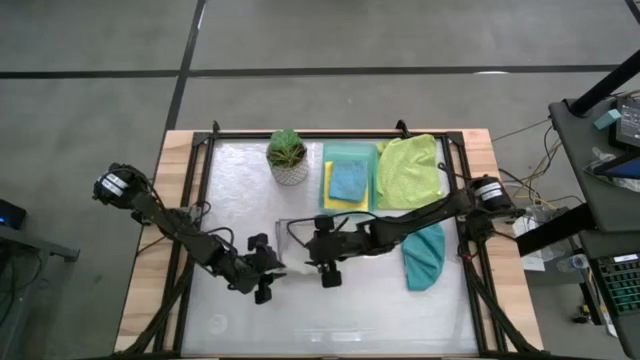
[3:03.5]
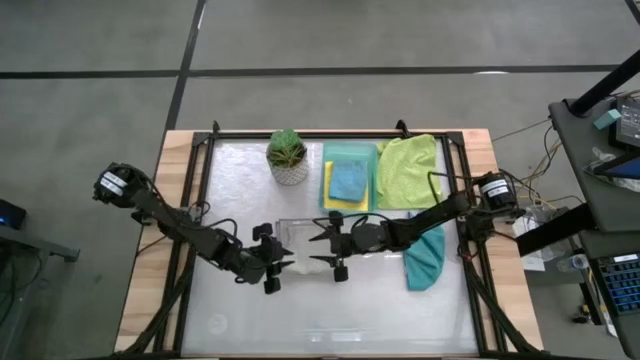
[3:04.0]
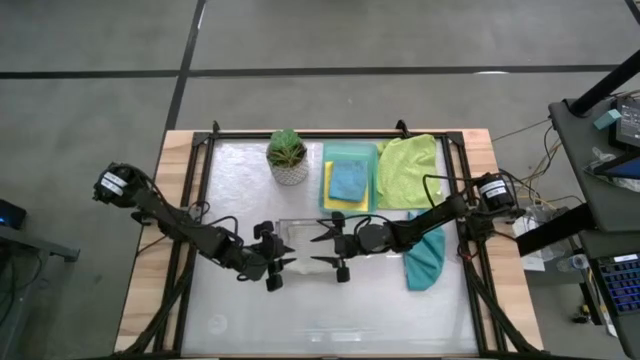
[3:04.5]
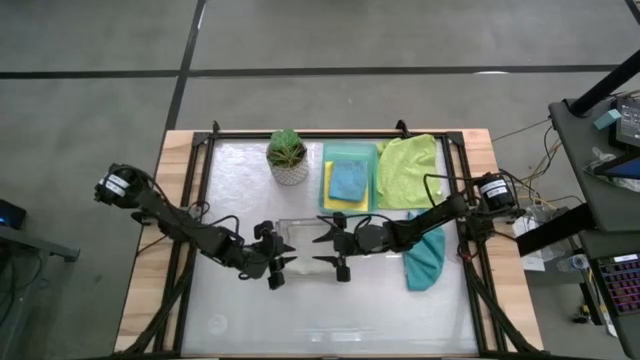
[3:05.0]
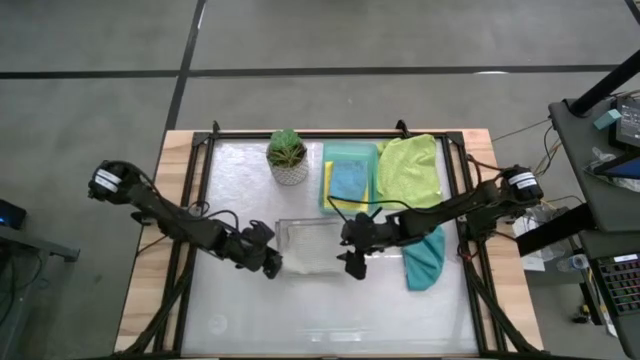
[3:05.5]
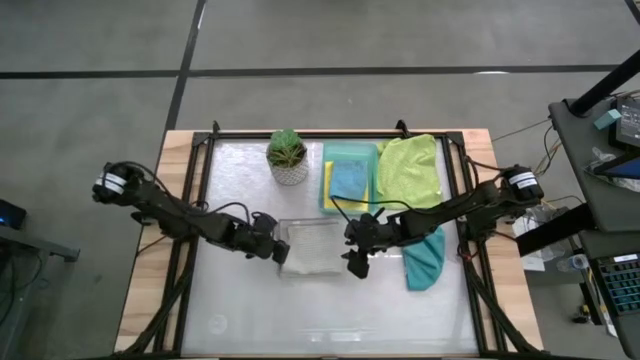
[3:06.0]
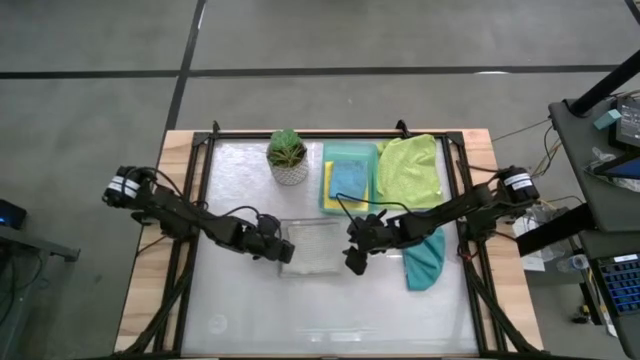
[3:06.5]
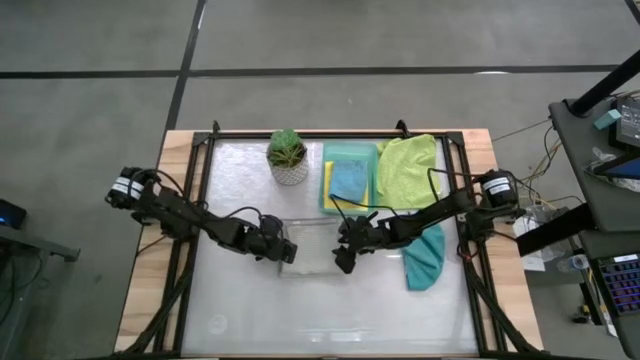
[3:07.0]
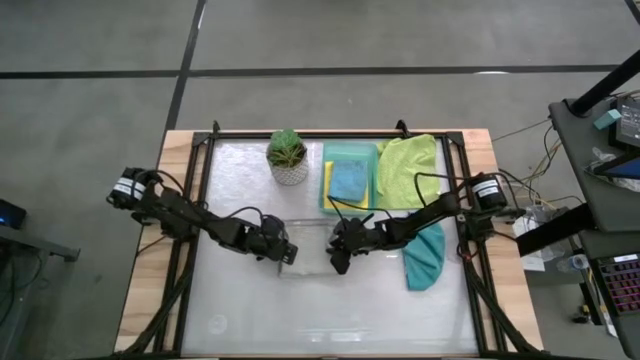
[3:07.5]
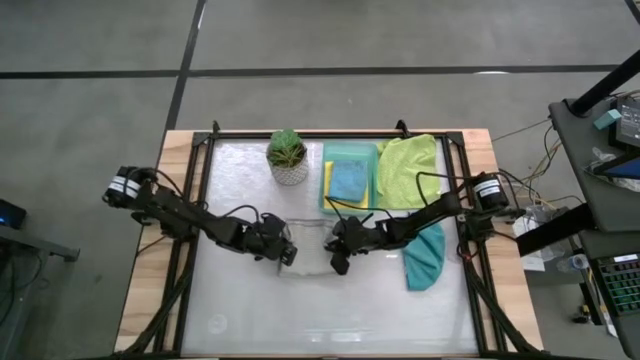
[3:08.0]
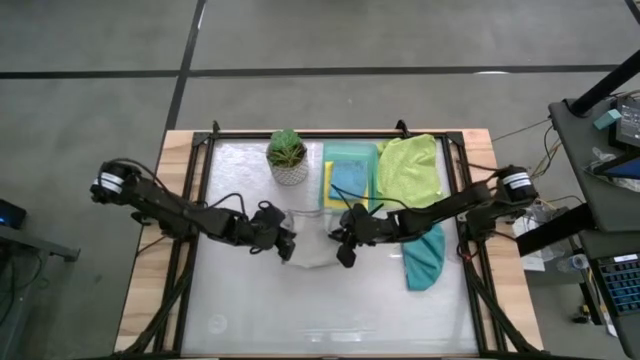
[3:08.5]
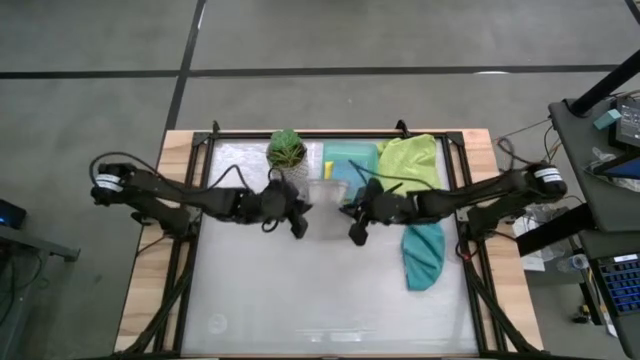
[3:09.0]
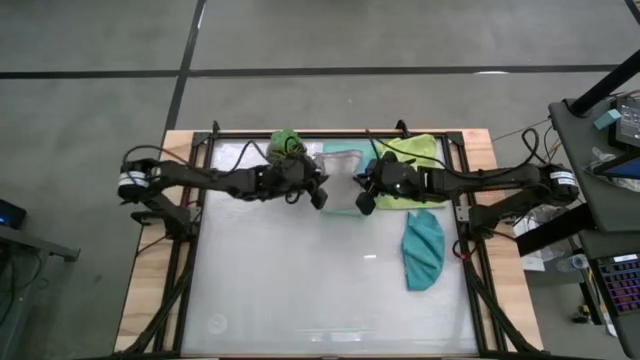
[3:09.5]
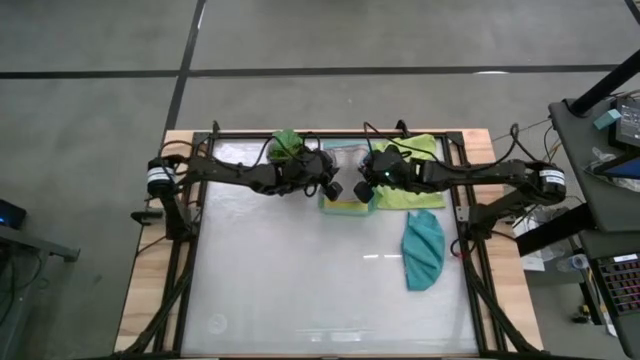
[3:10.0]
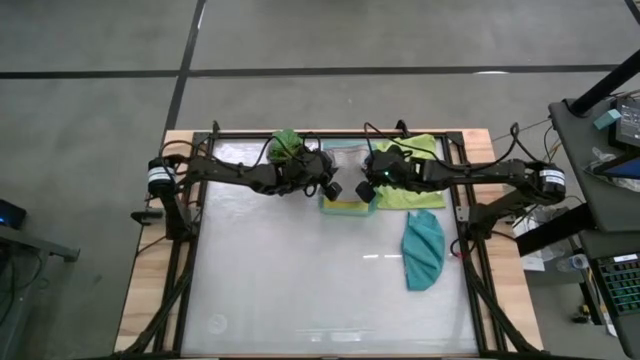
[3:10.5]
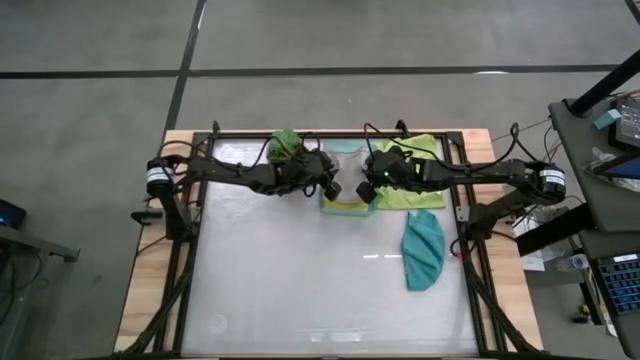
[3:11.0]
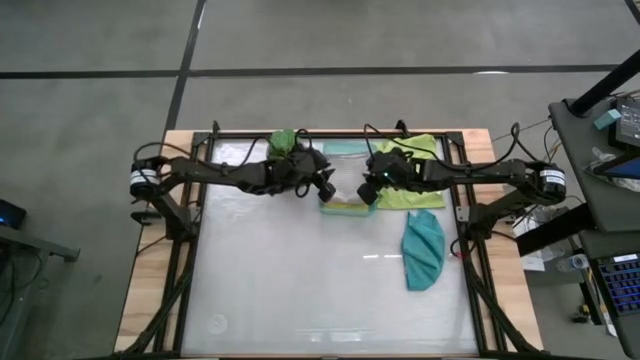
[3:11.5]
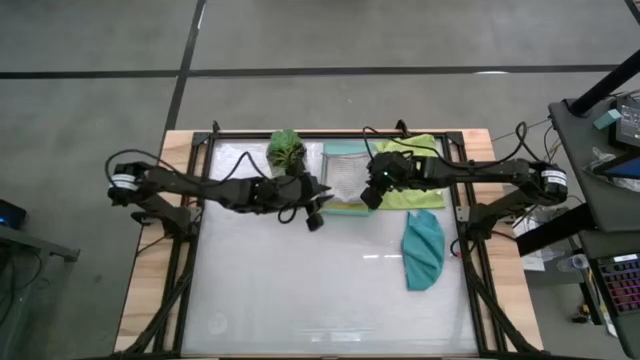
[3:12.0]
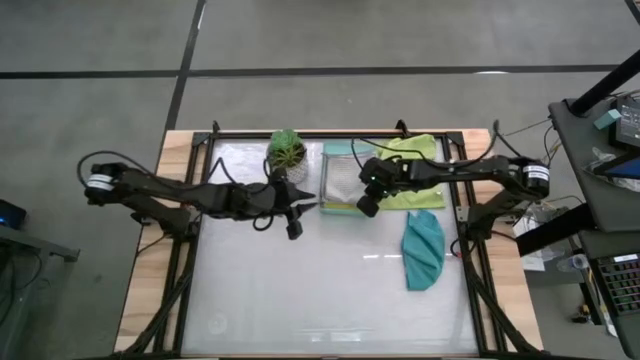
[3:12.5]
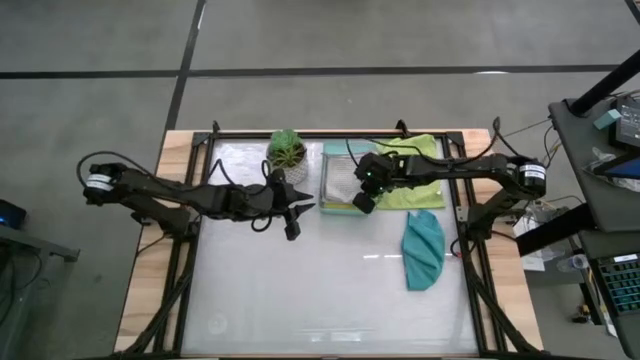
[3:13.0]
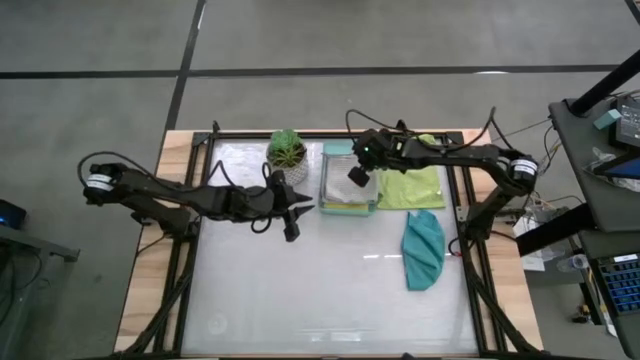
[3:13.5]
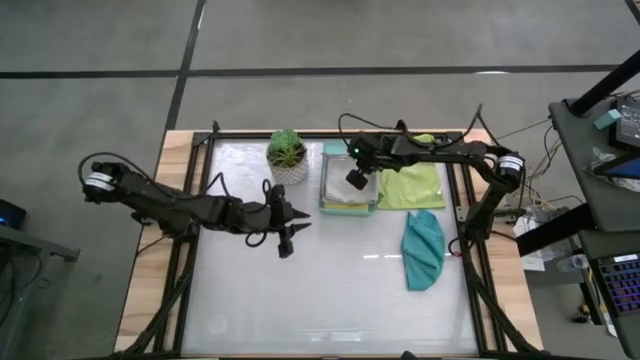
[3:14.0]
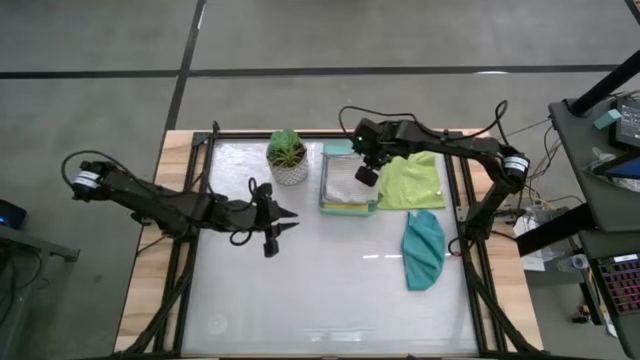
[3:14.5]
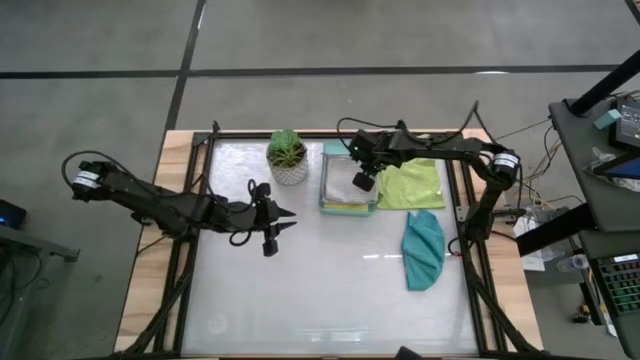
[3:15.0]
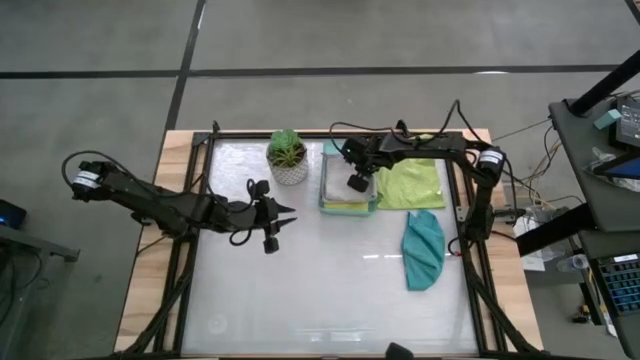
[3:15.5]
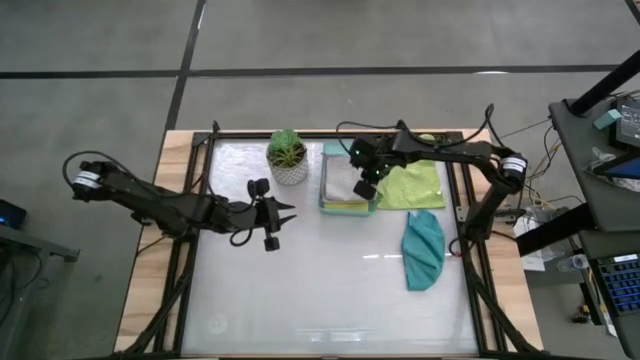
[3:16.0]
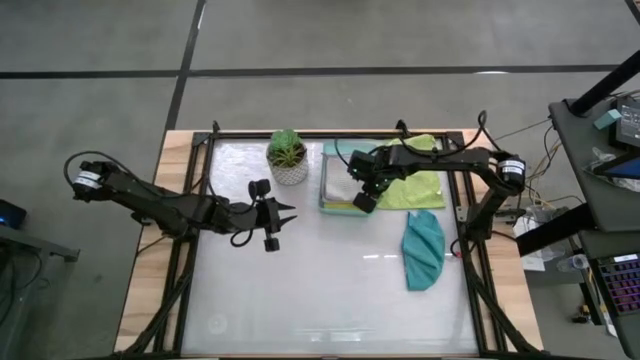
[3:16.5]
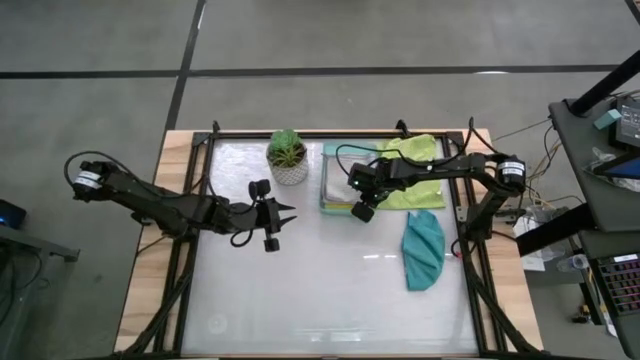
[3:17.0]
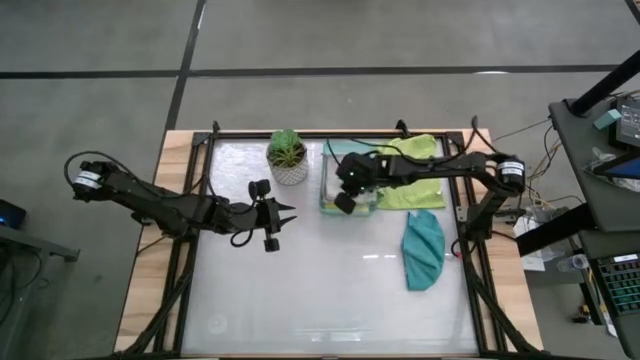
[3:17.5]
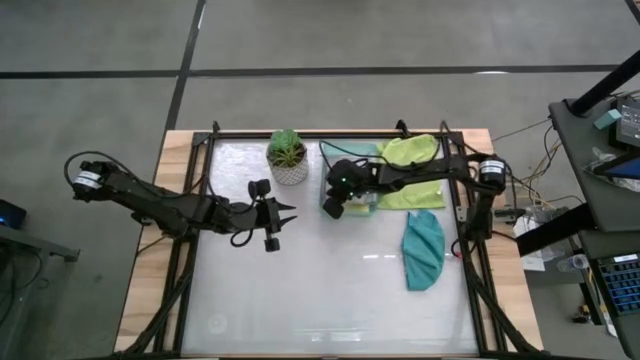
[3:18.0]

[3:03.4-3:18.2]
Task: Fold microfiber towels
Put the folded gray microfiber cloth into the blue bin

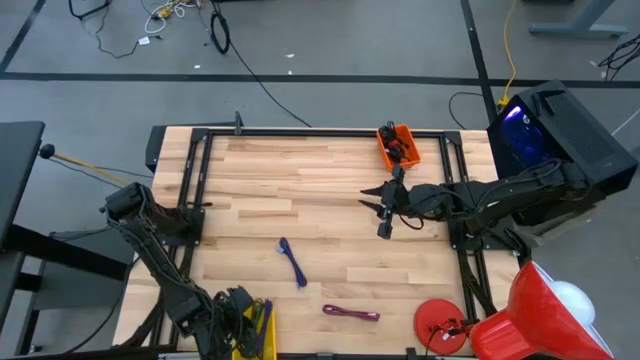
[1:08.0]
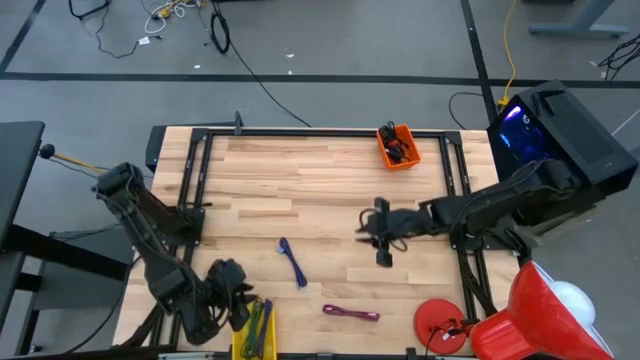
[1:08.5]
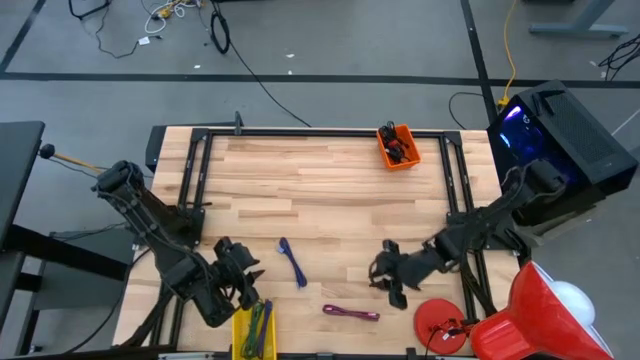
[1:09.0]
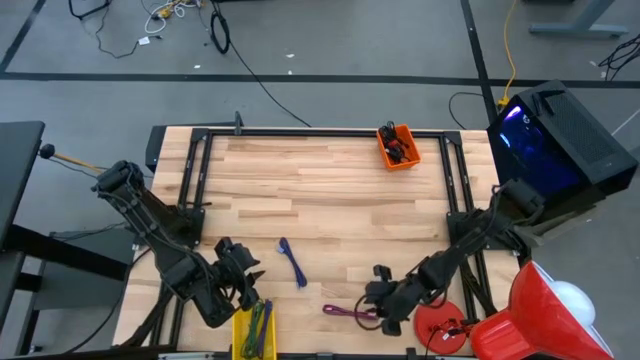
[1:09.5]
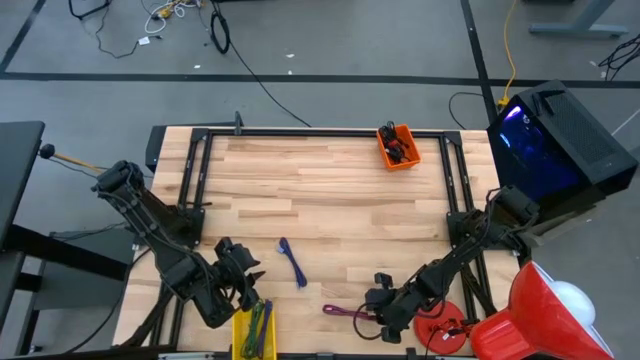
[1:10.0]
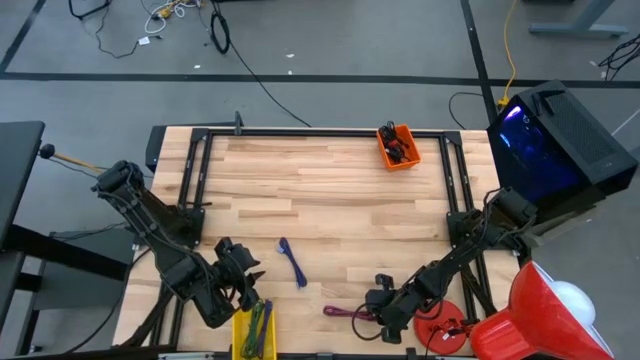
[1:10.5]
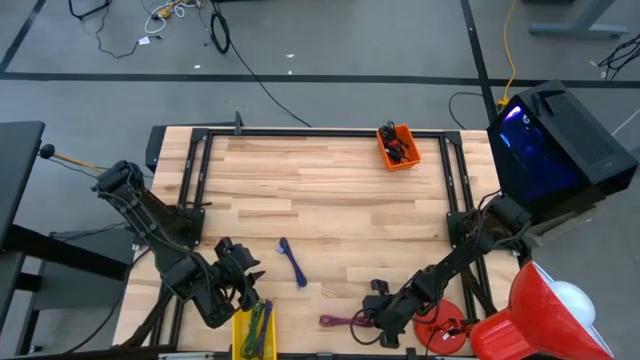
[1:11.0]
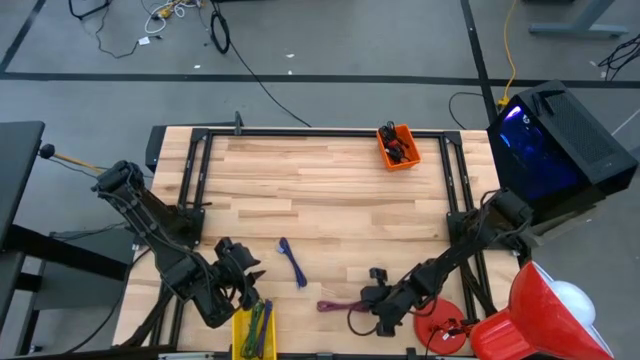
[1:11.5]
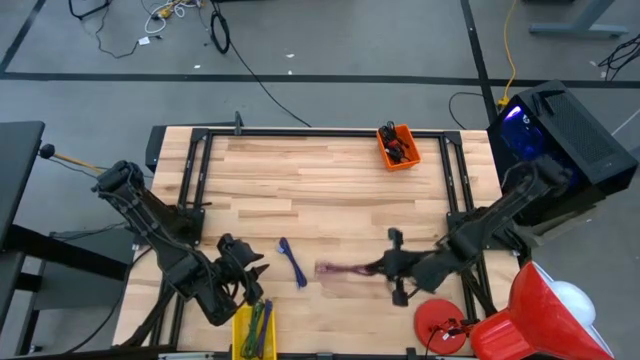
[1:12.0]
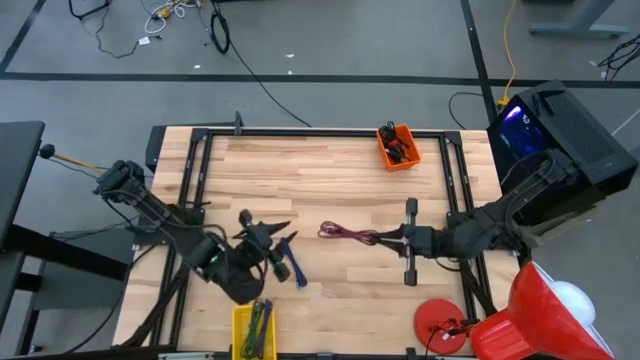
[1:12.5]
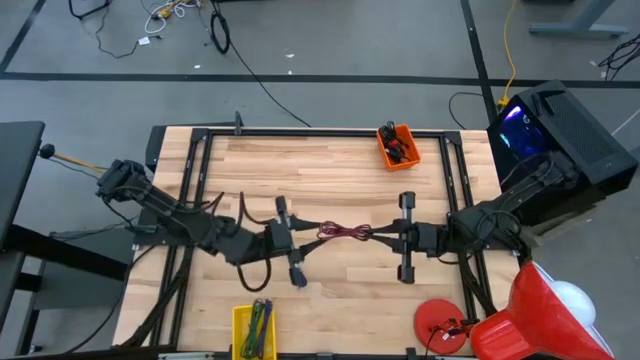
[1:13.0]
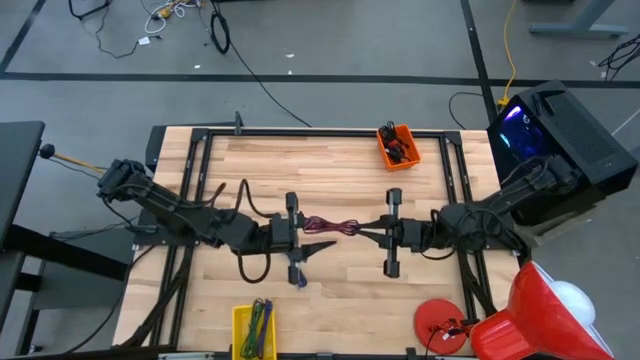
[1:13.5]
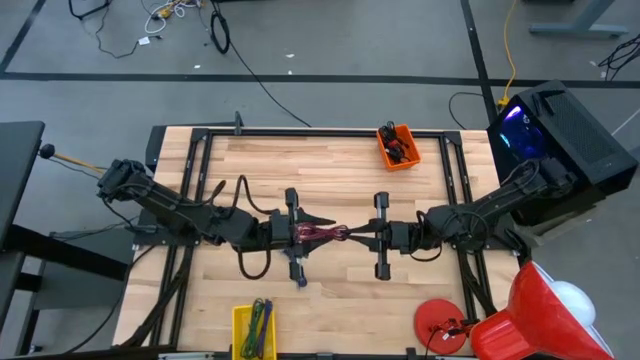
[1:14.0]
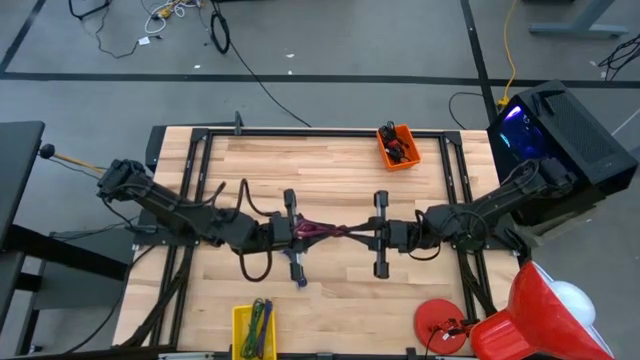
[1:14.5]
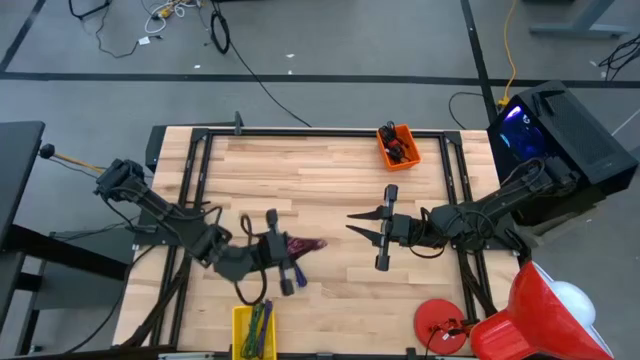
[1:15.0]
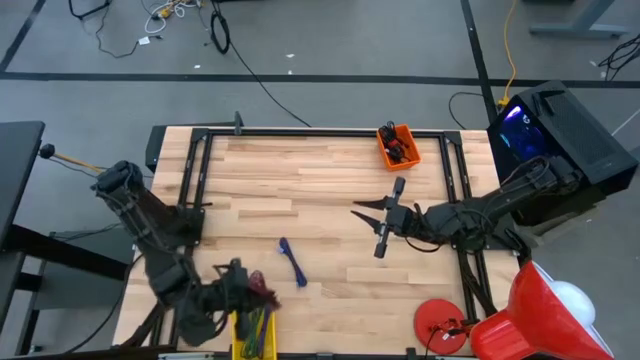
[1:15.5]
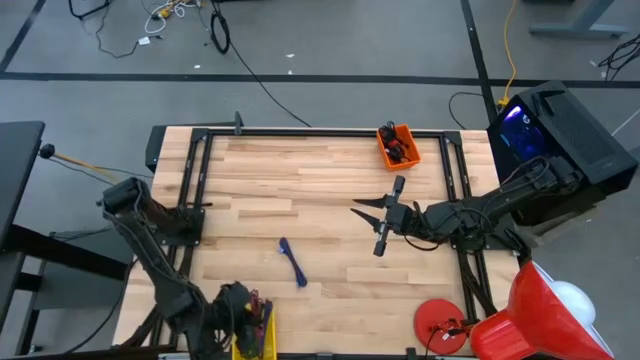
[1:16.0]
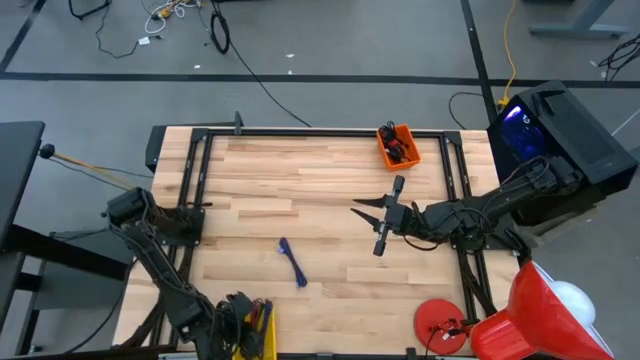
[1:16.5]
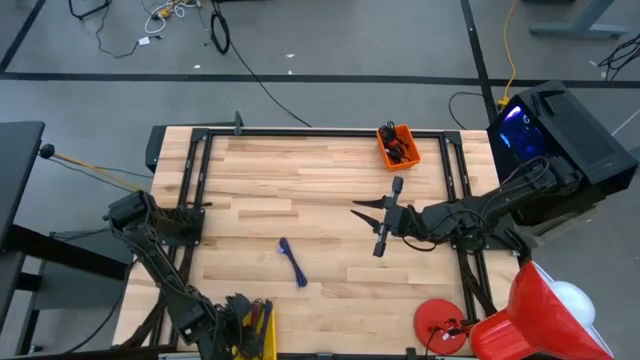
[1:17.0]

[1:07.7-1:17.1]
Task: Pick & Place USB Port
Put the pink and black charger cable into the yellow bin
